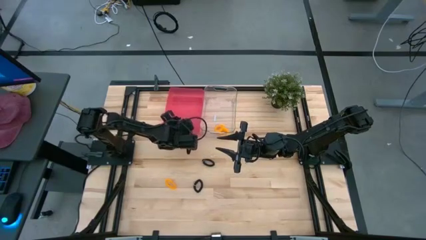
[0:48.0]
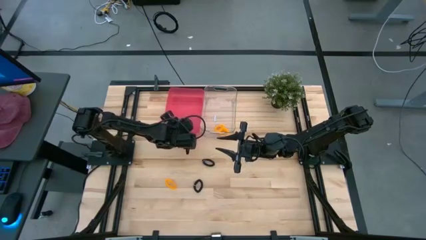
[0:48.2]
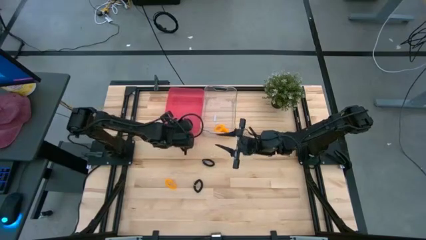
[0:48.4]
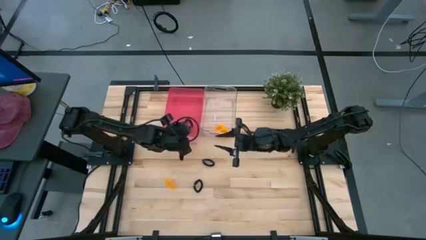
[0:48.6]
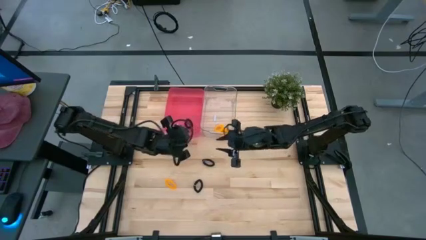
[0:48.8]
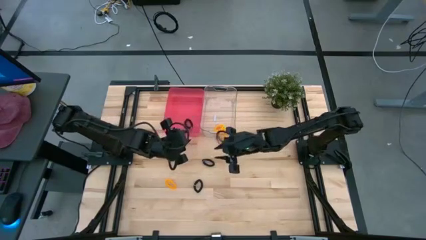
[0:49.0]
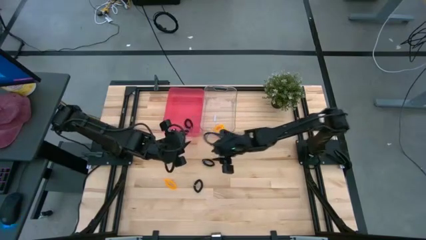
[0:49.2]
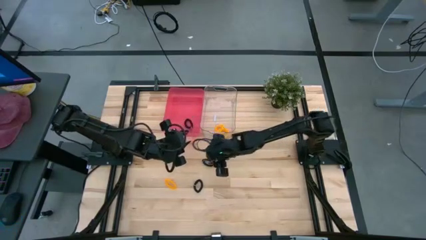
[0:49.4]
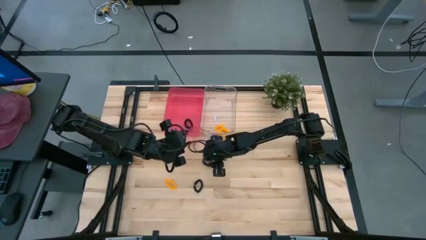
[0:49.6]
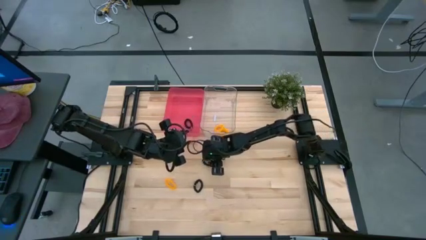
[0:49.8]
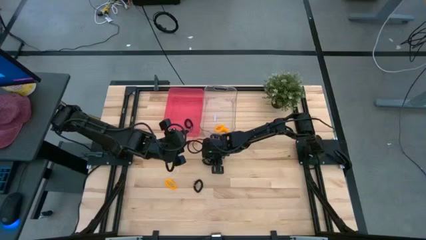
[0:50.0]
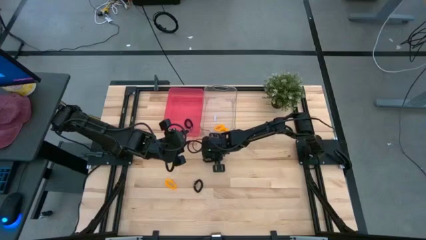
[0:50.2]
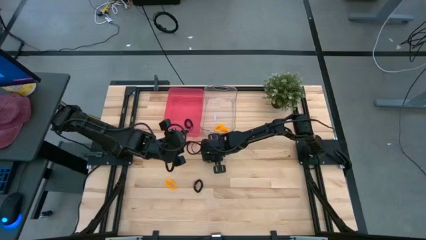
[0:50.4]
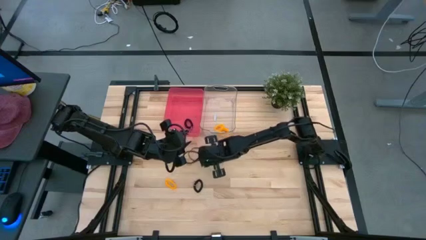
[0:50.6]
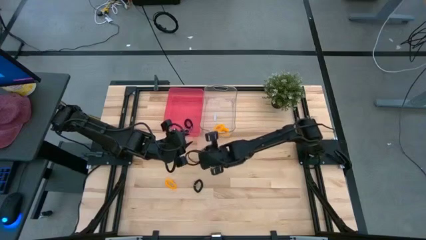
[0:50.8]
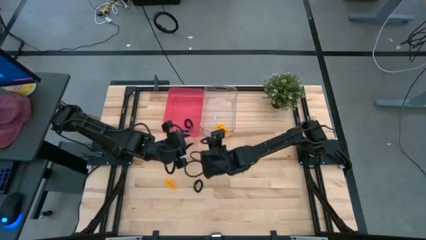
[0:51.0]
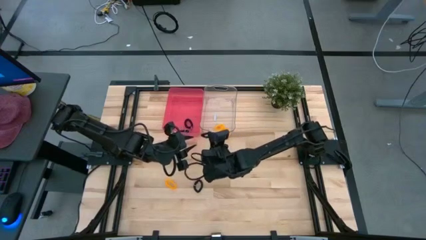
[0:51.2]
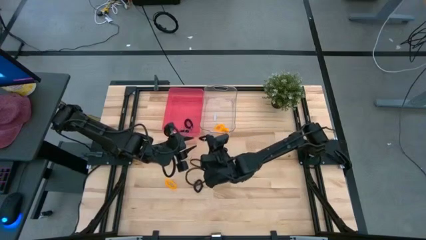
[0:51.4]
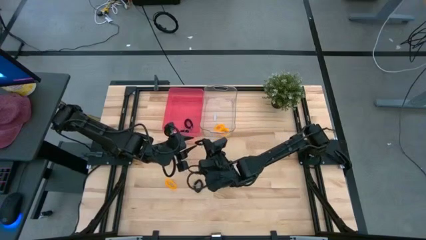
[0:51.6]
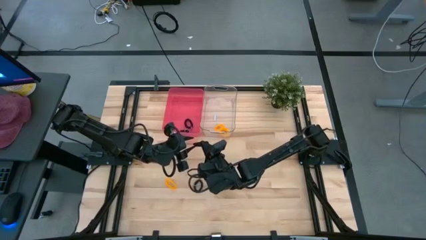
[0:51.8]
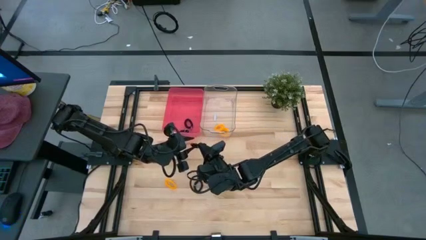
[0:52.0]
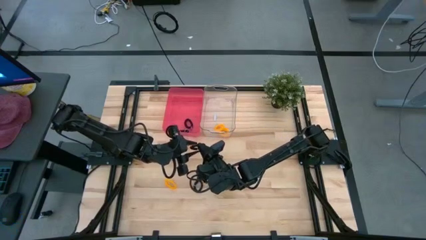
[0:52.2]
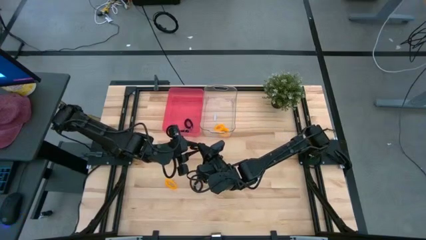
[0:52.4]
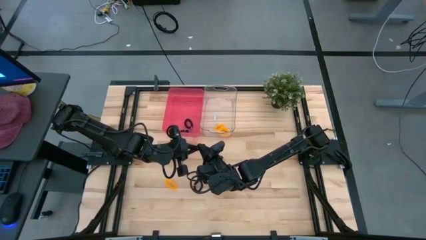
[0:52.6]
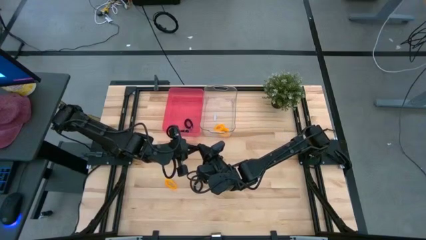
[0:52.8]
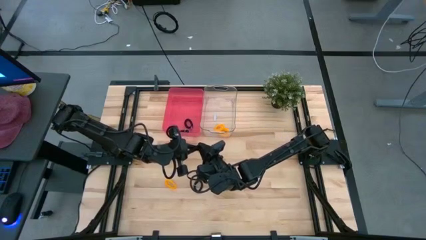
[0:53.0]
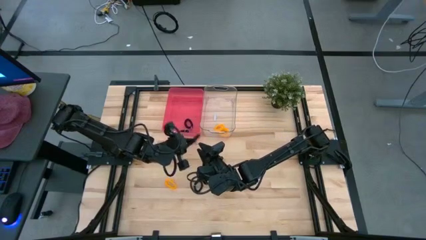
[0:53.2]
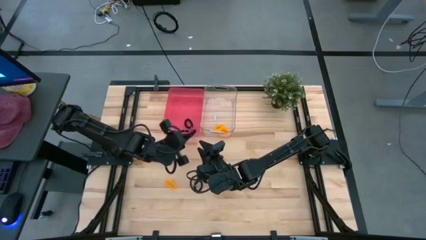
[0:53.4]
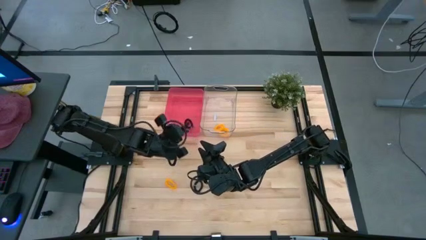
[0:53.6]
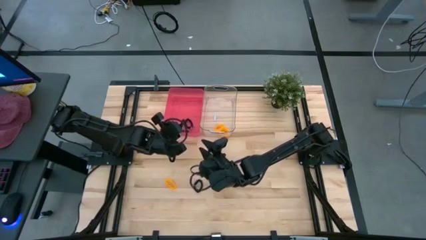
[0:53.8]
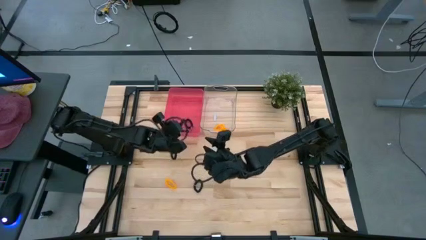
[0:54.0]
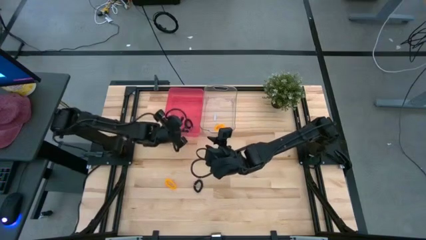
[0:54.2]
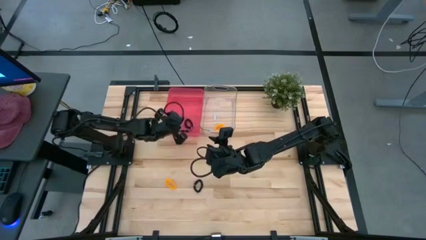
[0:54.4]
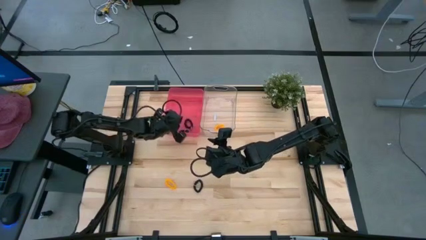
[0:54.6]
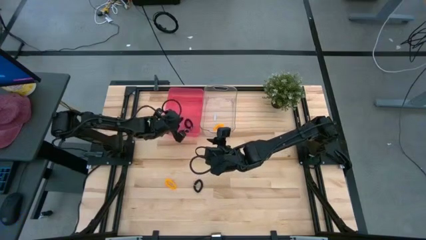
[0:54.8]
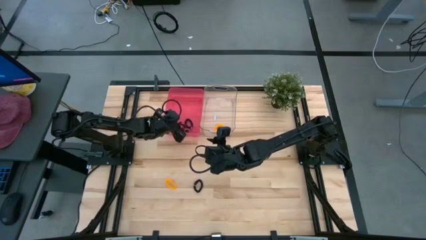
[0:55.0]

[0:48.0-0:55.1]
Task: Sort spring keychains
Put the black spring keychain into the red bin

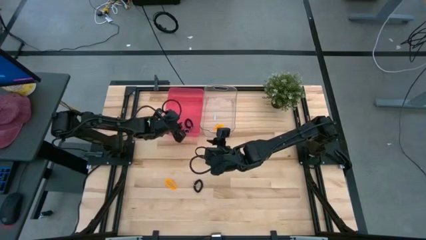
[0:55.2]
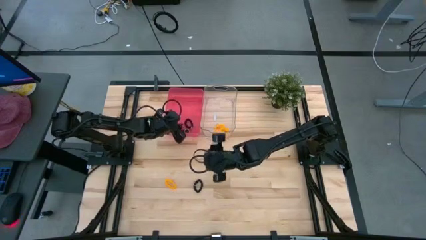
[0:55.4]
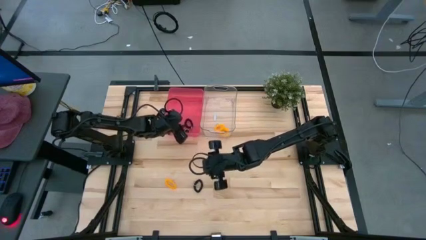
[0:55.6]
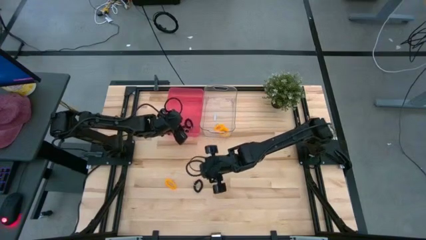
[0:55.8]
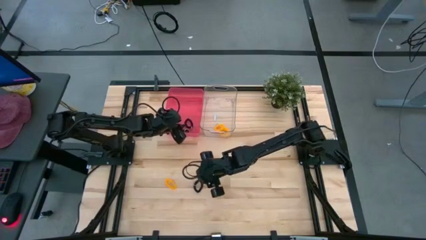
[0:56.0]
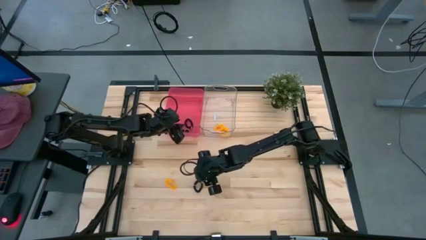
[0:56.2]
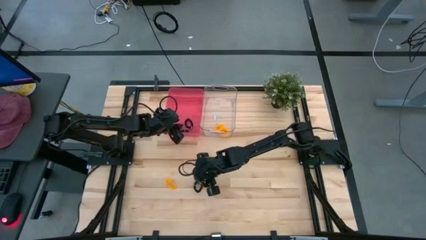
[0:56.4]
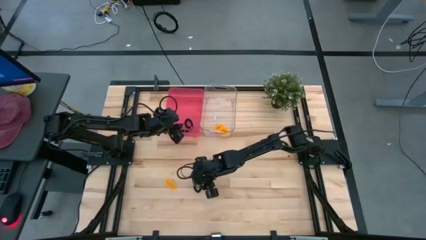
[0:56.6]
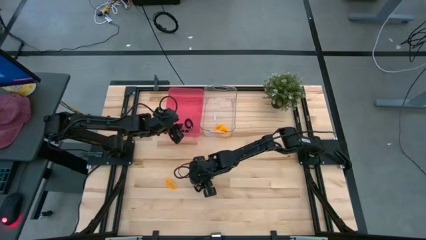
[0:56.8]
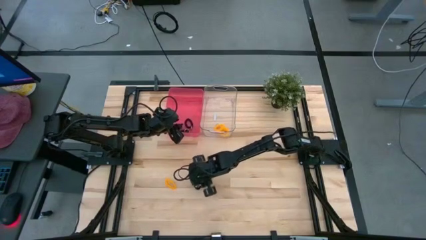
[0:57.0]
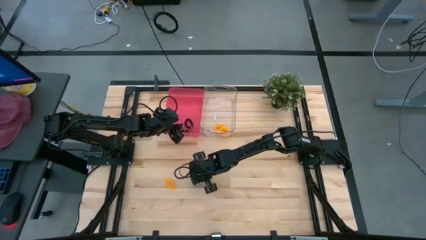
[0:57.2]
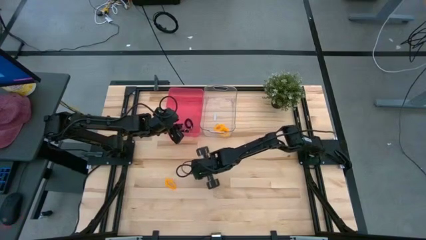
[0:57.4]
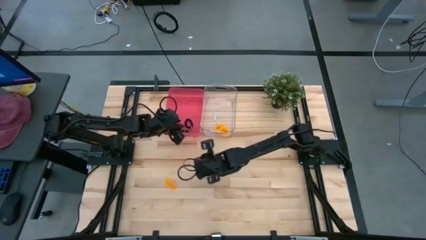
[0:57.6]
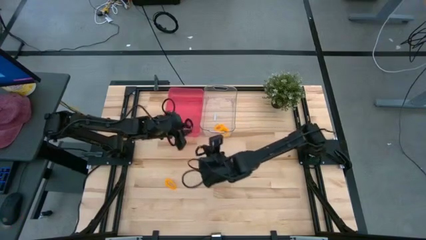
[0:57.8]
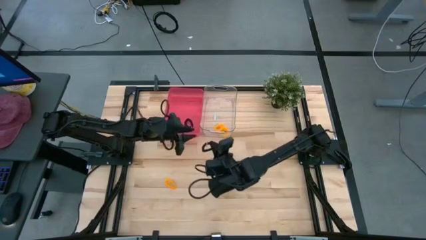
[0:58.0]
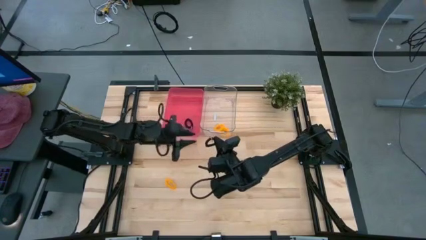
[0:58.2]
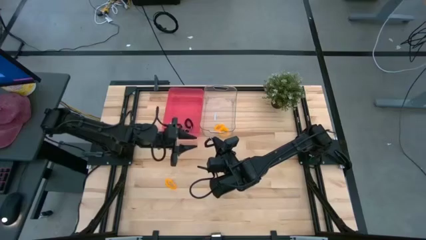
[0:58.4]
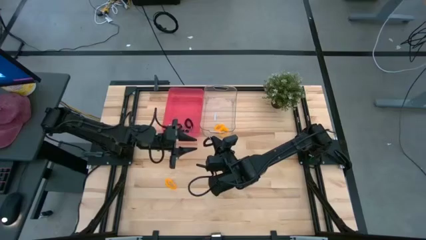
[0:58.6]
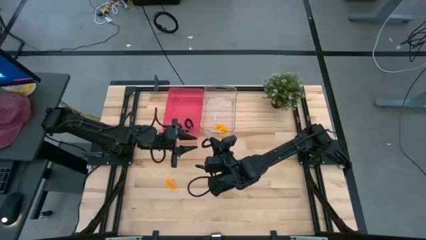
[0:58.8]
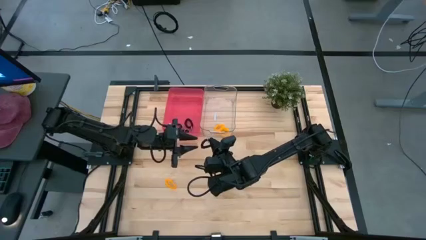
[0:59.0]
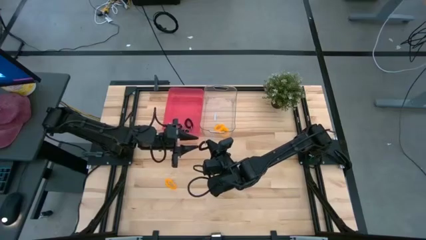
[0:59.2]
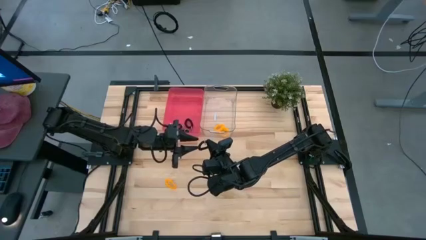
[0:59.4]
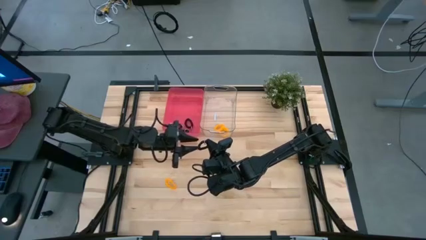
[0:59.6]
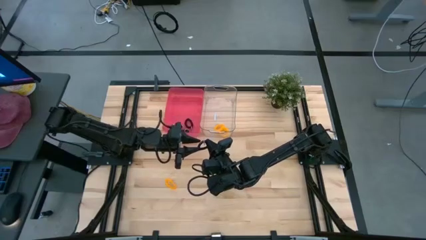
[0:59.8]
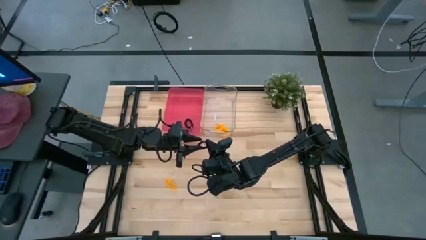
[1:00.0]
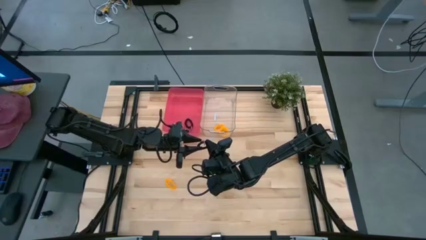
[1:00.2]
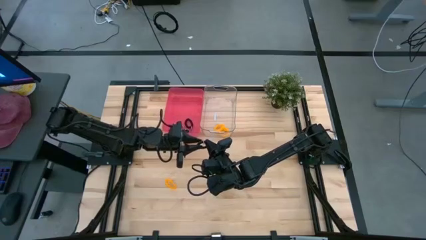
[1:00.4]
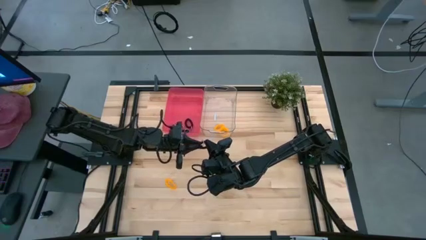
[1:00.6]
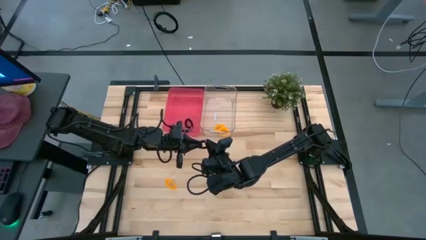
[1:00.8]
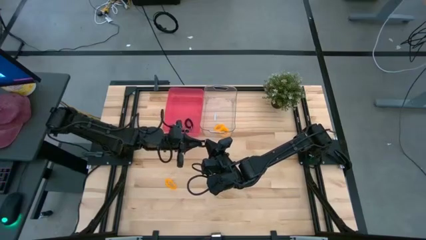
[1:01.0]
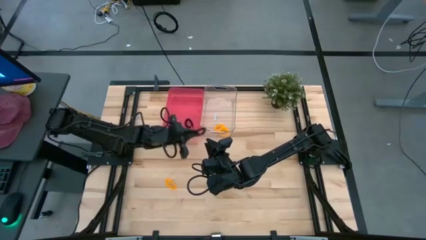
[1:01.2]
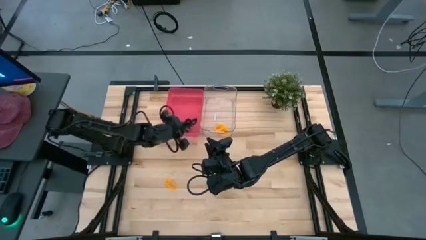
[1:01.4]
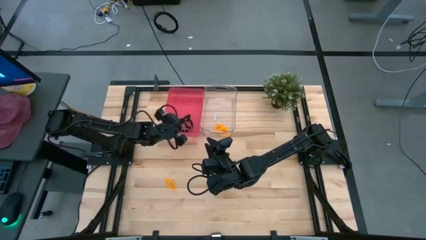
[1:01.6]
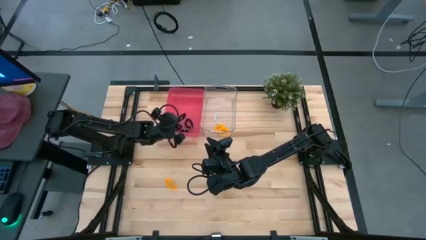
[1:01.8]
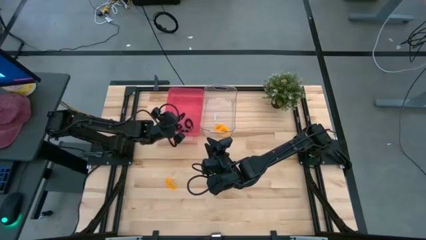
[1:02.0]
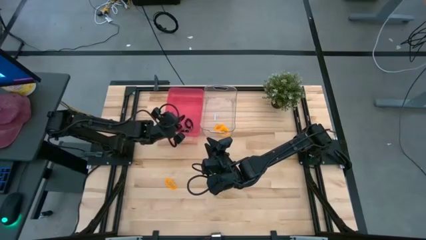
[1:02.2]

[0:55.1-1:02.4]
Put the black spring keychain into the red bin
